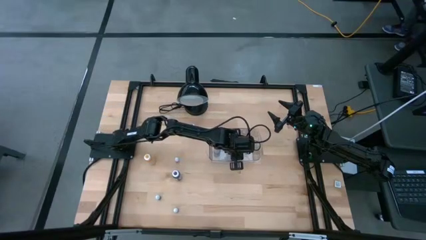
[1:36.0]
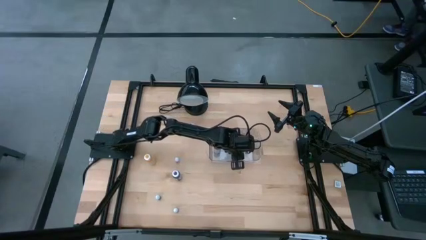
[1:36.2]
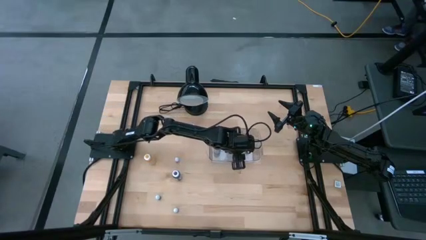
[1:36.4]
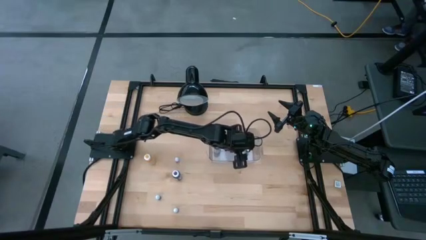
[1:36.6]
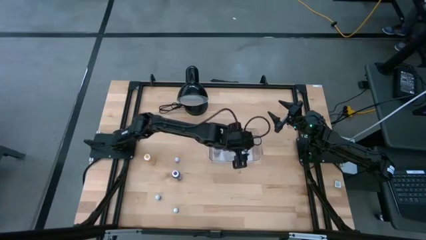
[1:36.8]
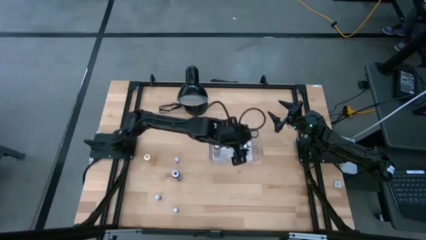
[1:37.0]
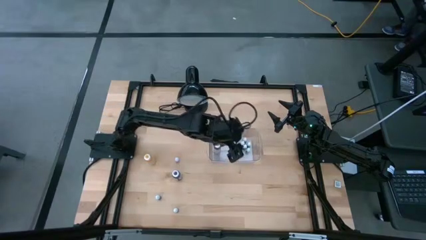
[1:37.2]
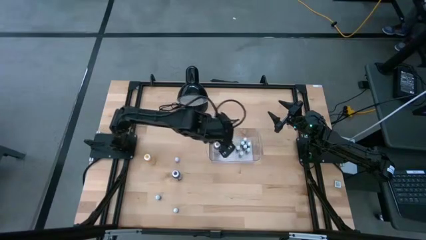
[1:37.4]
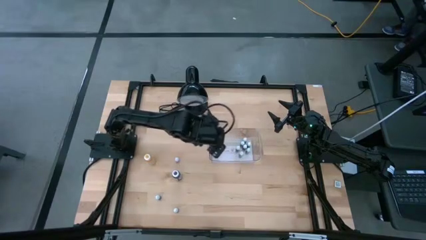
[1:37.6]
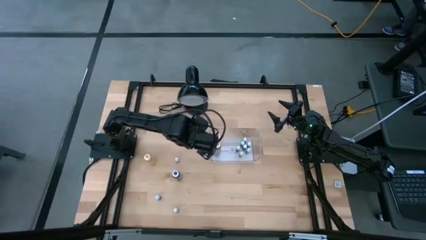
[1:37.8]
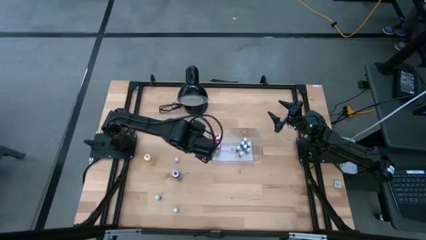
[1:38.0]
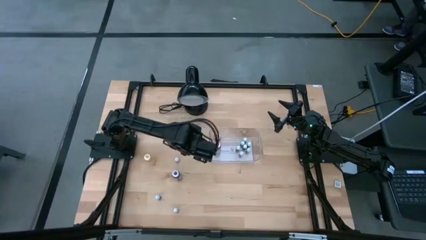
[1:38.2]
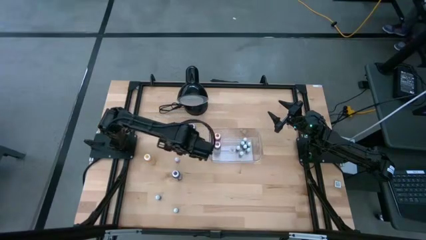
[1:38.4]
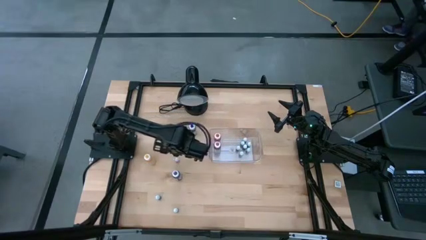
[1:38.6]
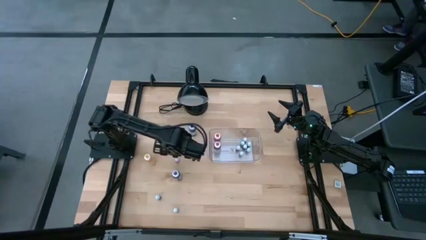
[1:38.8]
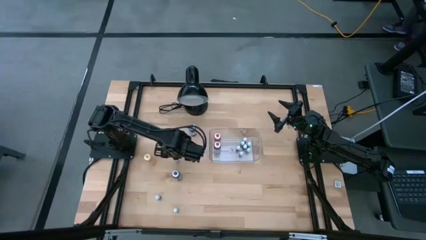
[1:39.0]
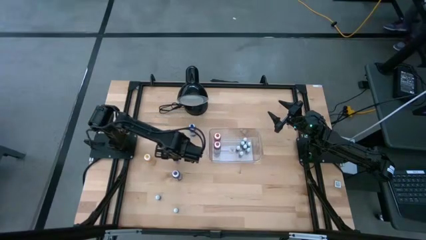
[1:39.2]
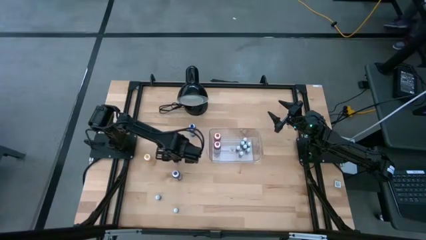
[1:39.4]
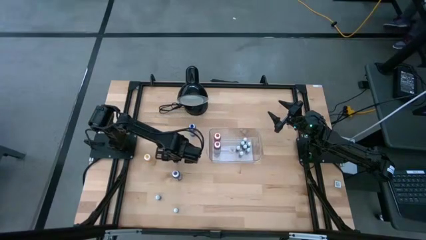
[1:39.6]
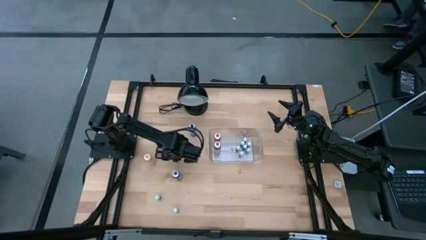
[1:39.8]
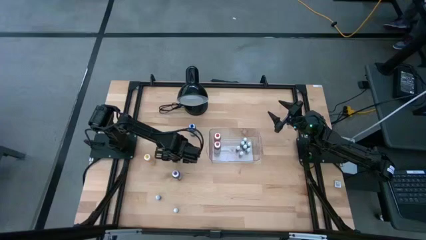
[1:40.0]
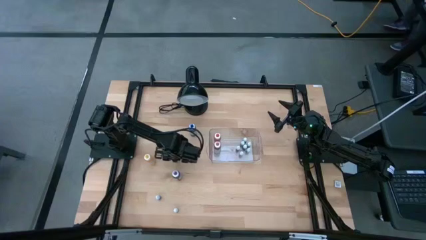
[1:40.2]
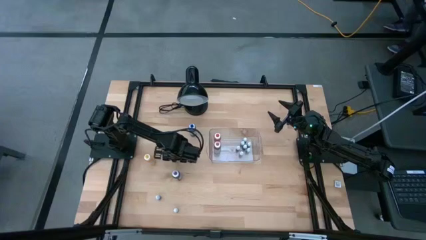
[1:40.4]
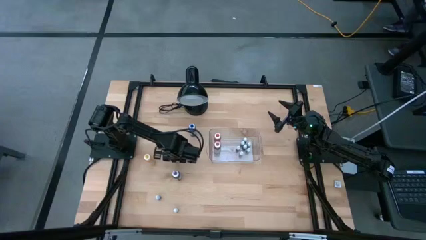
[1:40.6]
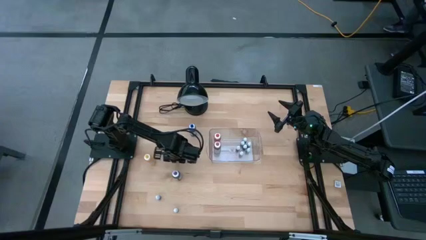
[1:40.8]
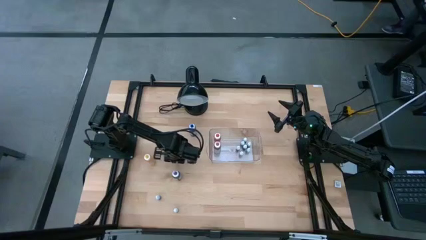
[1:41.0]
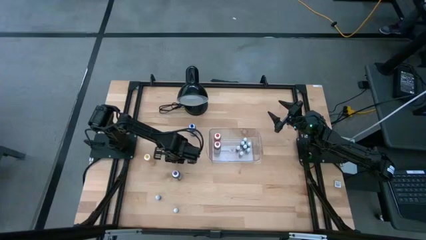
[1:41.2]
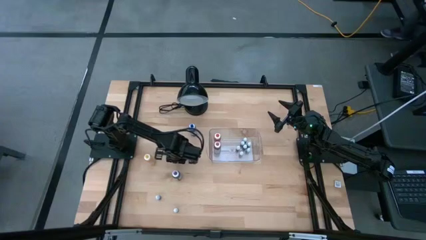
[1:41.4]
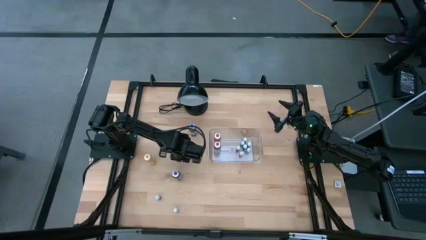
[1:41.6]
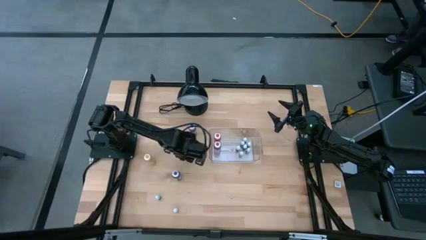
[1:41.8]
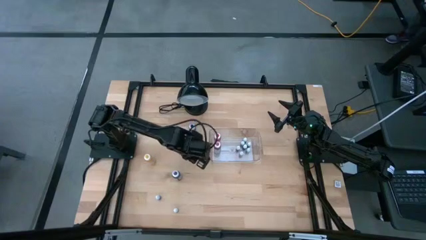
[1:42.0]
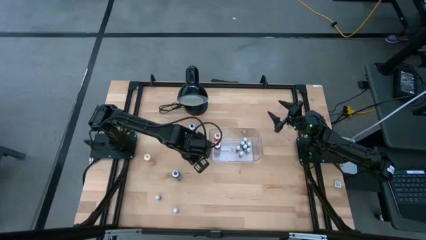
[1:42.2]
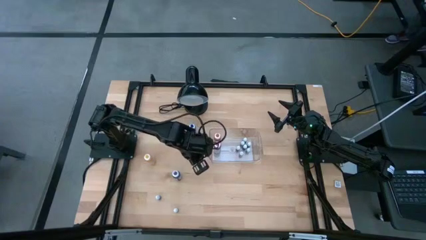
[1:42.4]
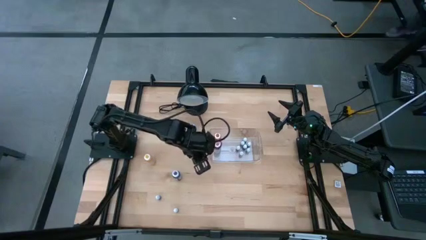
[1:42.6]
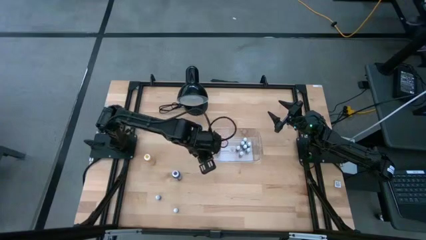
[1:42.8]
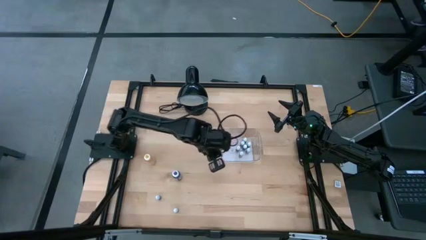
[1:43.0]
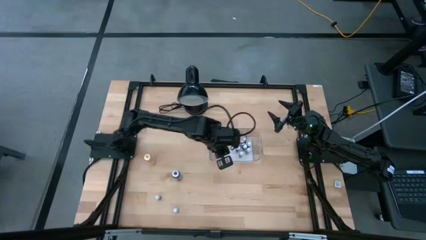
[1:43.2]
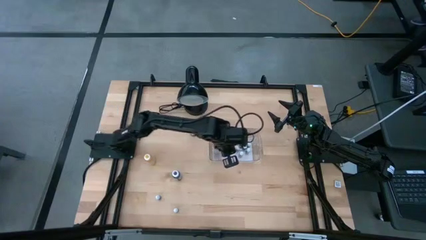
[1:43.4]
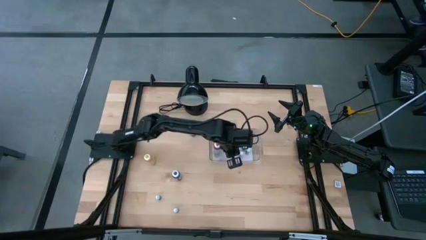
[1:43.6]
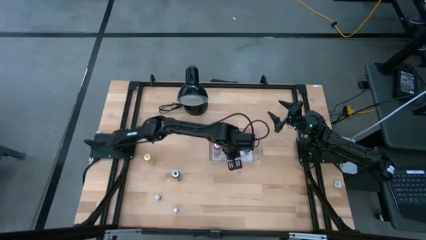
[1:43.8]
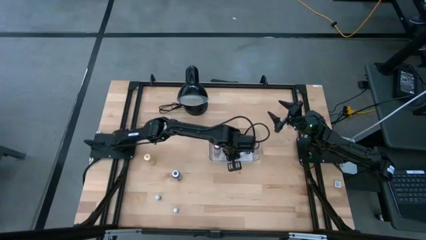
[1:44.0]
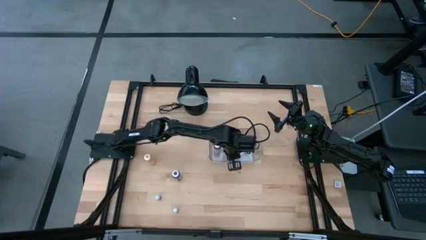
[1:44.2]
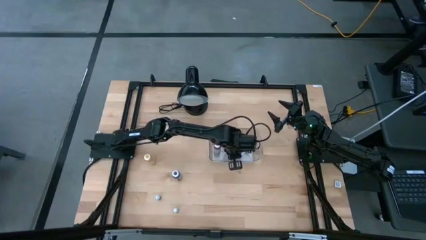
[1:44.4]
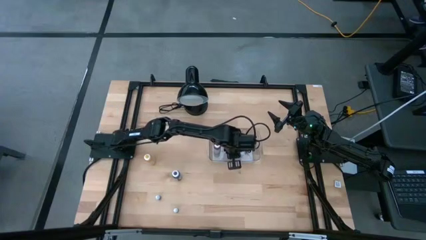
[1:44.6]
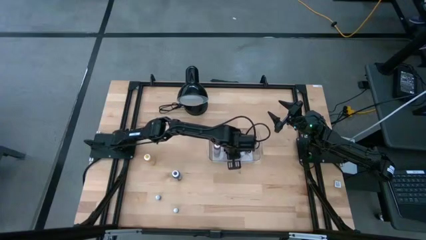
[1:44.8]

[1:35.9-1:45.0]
Task: Pick & Place food coloring
Put the small pink food coloring bottle into the transparent bin

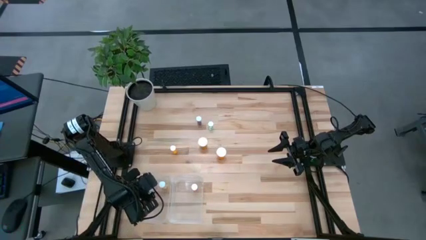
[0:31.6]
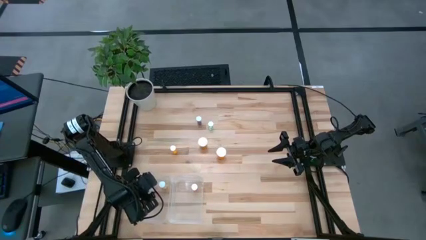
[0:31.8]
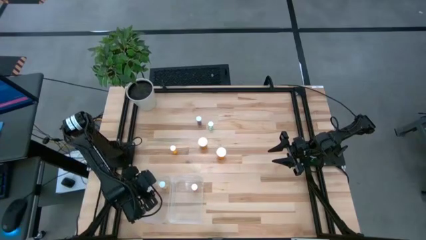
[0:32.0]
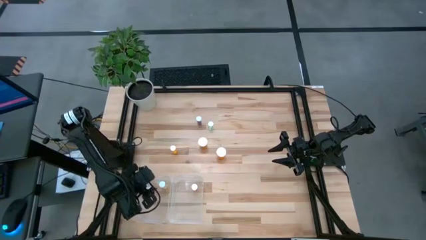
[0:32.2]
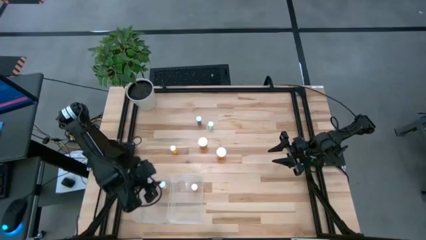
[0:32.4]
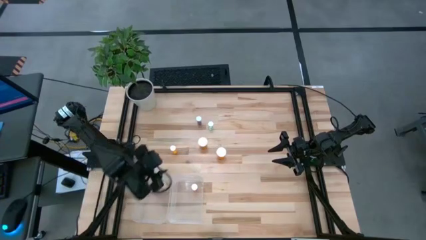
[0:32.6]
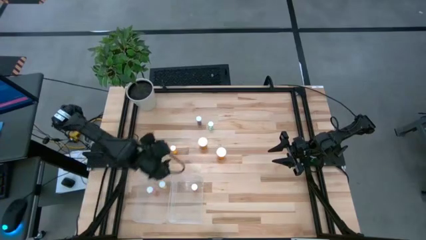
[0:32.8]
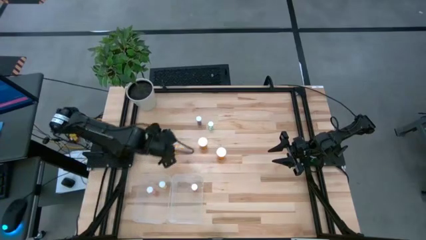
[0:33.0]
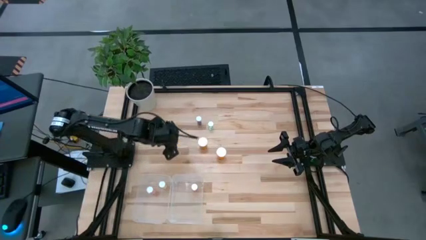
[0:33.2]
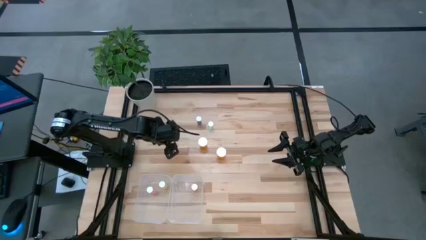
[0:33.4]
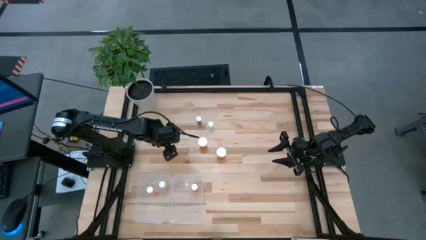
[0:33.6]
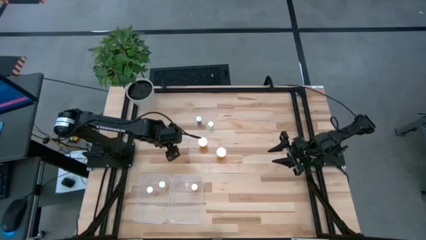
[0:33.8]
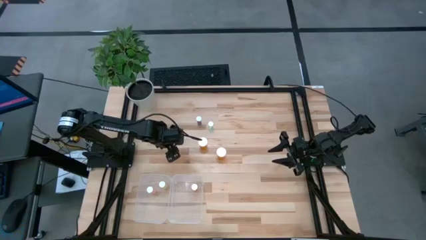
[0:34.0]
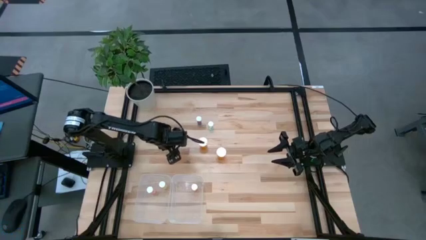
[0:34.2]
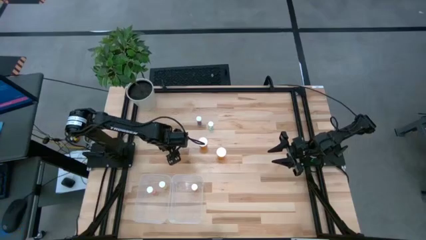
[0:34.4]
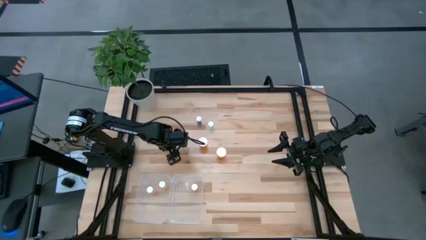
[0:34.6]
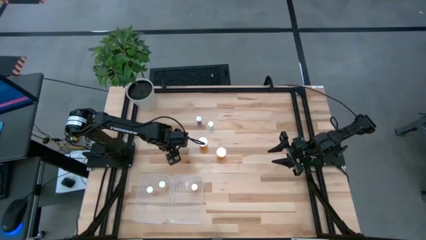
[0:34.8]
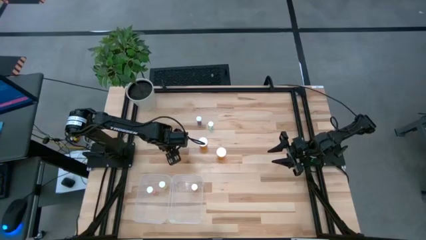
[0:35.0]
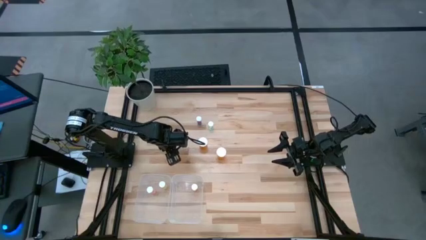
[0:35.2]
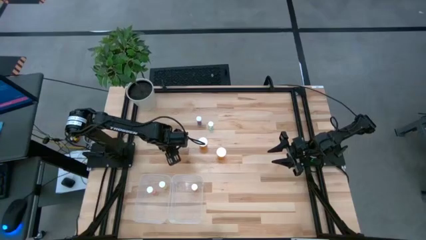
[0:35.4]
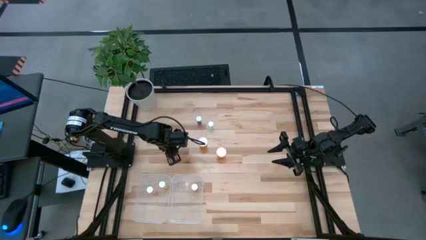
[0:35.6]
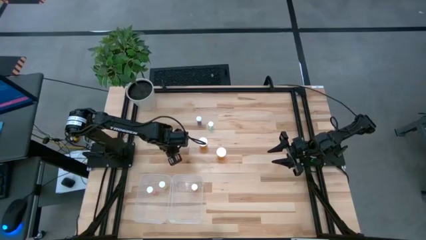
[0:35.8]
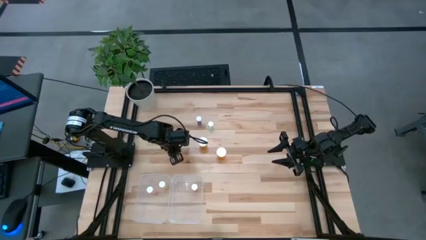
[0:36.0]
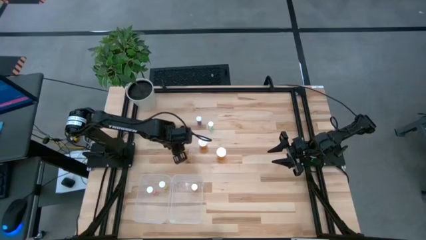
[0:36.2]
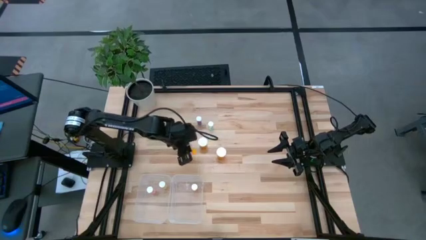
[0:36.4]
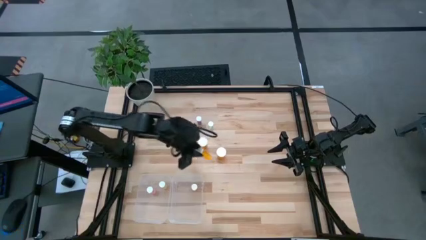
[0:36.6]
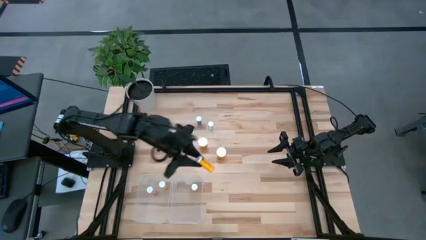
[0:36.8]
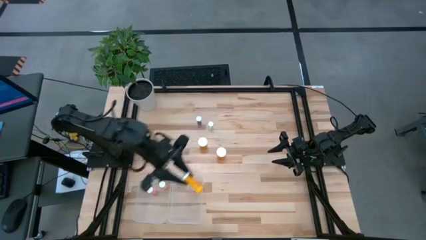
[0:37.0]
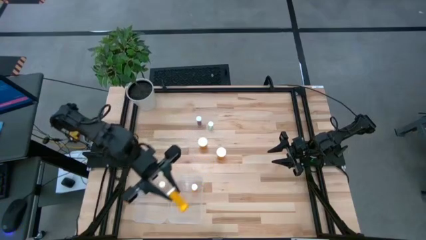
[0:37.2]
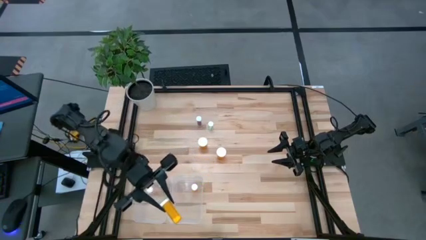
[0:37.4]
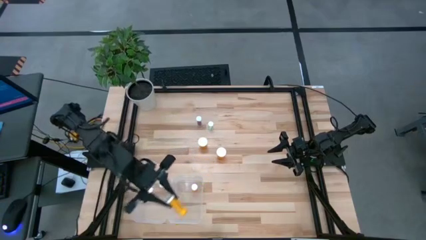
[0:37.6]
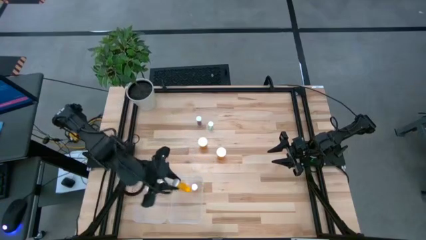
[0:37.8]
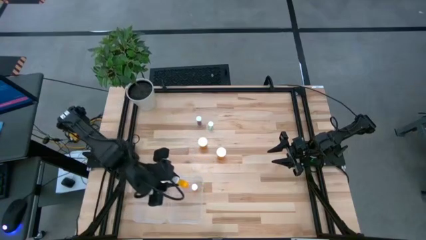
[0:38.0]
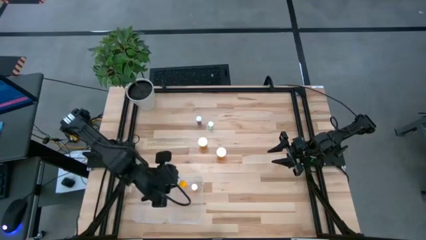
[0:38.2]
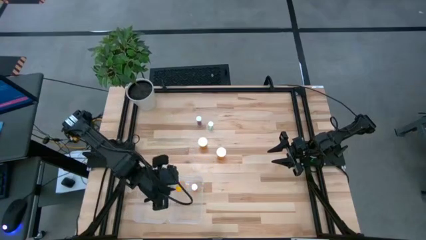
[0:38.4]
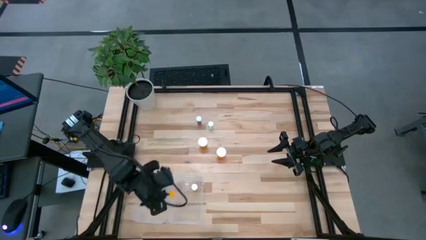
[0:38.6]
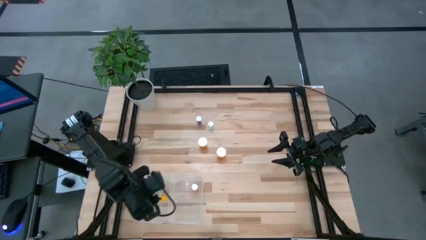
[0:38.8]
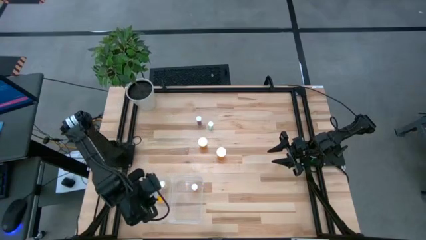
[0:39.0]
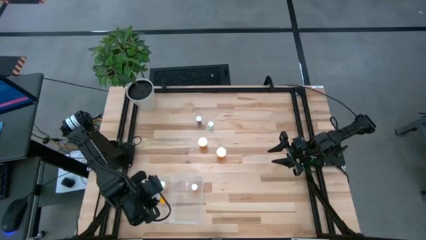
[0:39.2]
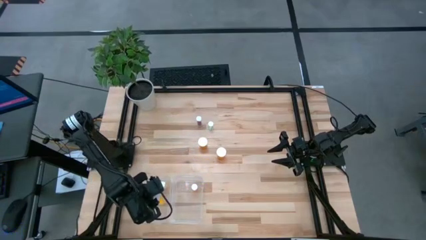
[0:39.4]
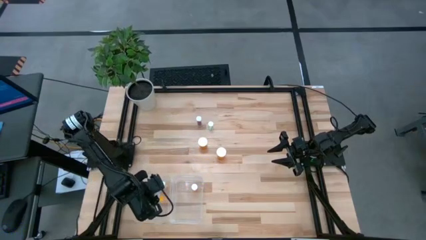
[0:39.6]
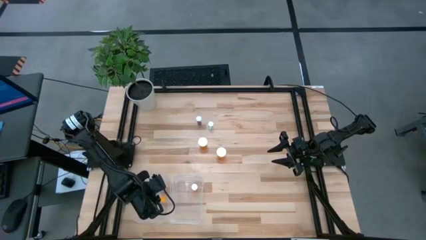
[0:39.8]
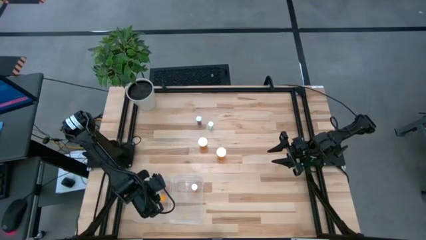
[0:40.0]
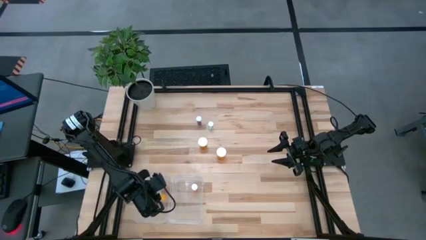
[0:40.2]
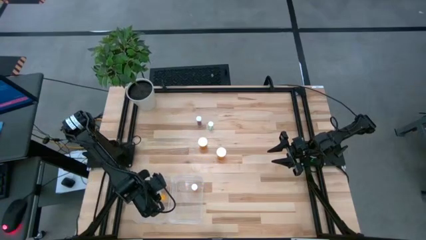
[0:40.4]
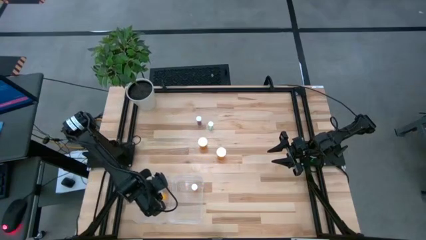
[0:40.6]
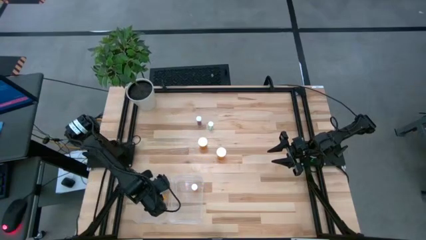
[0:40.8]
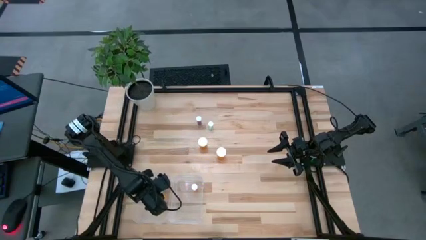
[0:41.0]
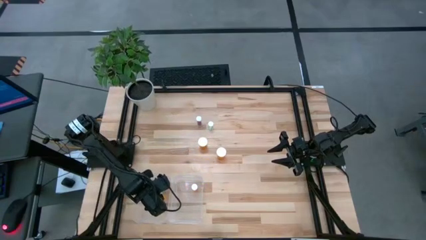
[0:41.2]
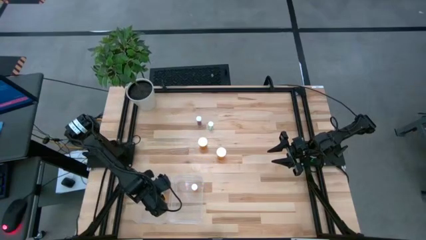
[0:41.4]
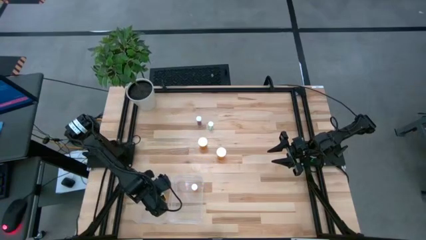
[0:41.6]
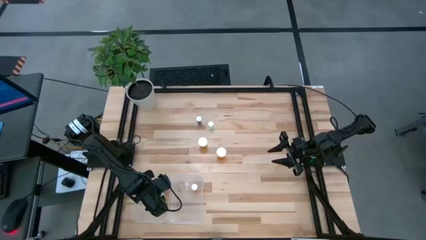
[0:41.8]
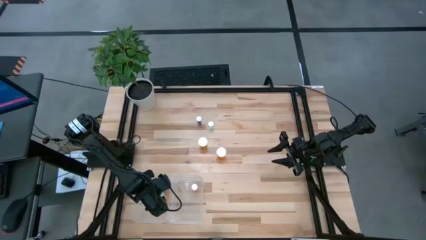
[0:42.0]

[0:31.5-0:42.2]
Task: Pick and place medicine bottles into bin by pill shape (circle, oval)
Put the small orange tablet bottle into the left transparent bin
